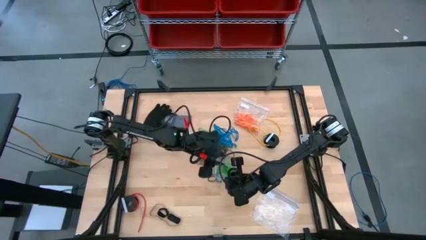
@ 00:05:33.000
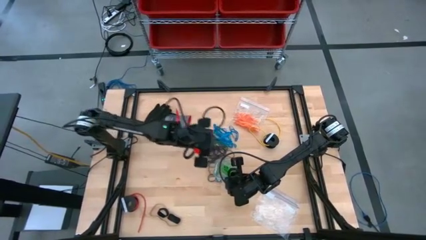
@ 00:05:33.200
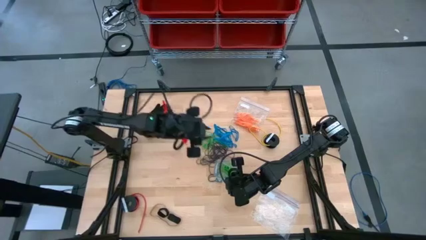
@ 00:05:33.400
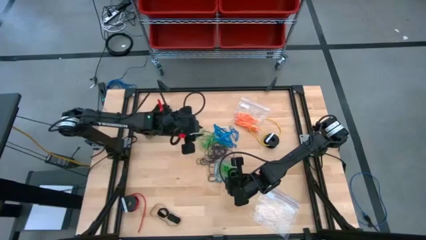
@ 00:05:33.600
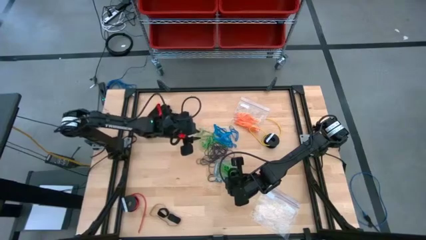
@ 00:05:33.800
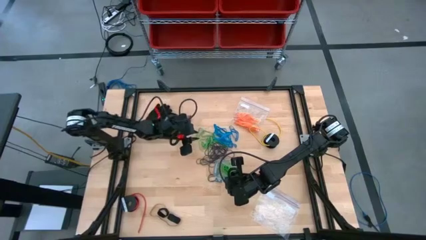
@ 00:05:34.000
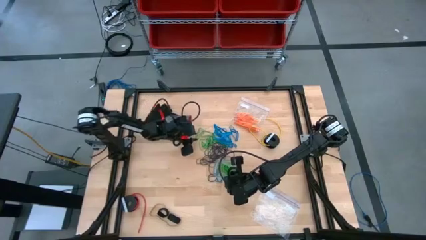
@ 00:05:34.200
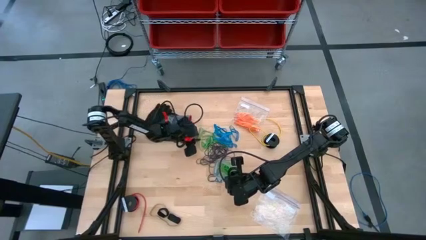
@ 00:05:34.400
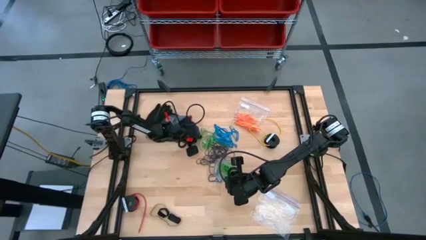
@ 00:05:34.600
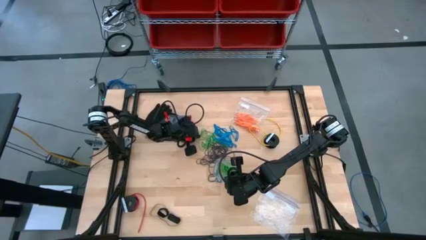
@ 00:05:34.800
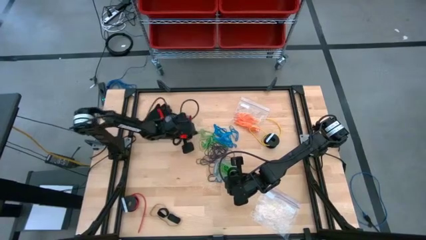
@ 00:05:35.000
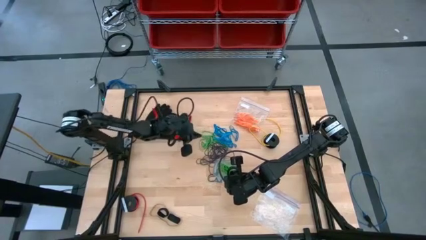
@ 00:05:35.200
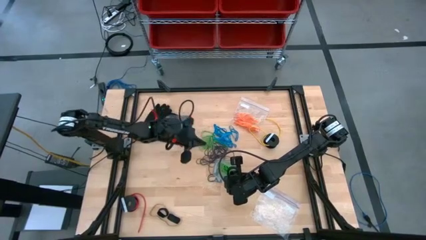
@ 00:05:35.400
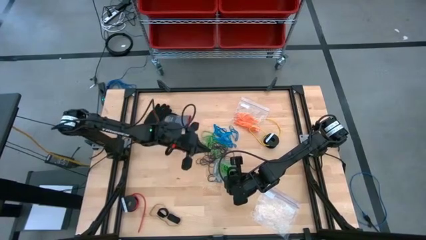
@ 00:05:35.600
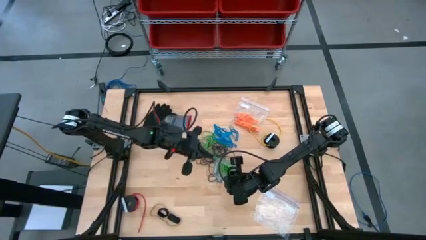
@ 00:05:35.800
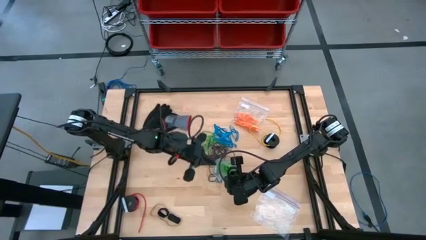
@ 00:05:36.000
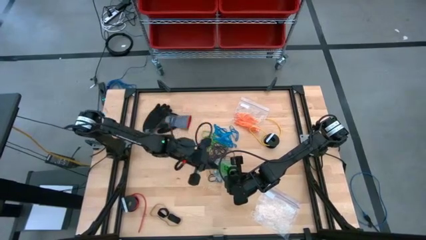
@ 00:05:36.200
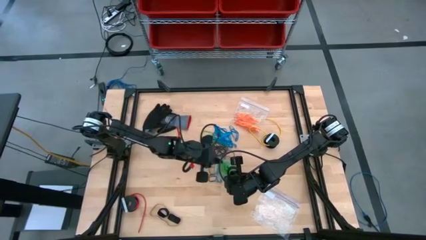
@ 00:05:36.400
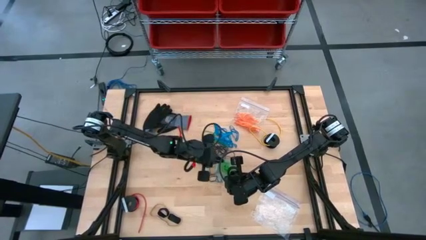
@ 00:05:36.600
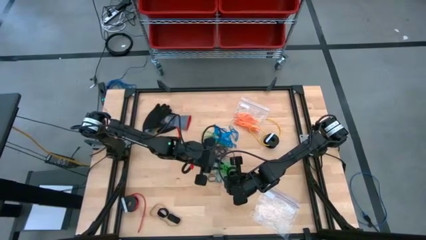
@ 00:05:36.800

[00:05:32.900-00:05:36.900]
Task: Sort rubber bands
Put the green rubber band into the transparent zip bag

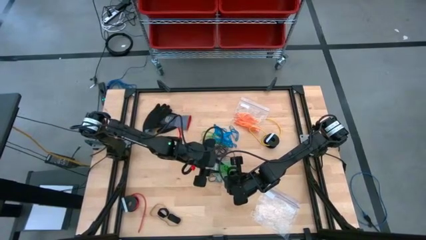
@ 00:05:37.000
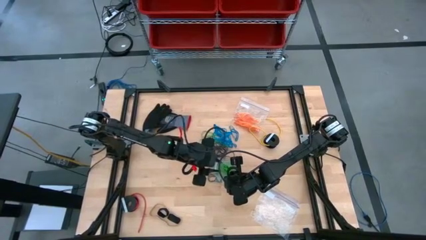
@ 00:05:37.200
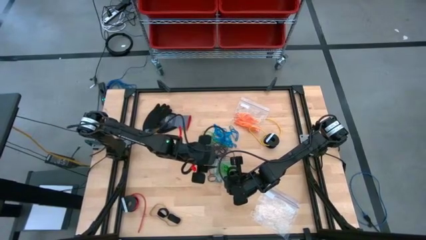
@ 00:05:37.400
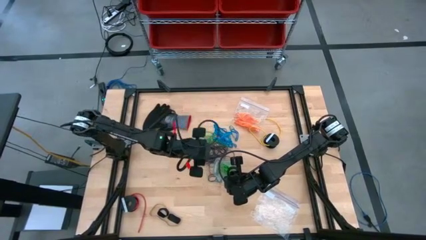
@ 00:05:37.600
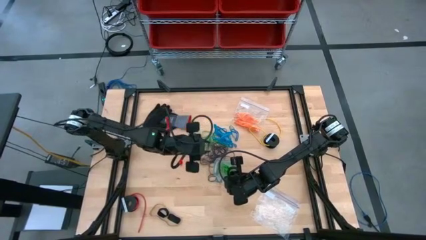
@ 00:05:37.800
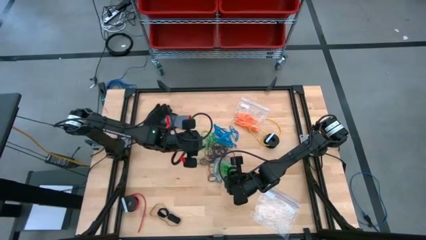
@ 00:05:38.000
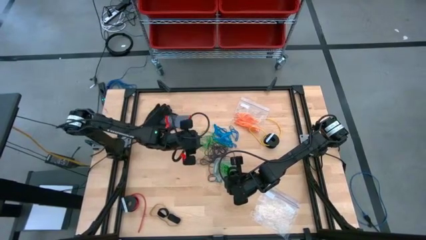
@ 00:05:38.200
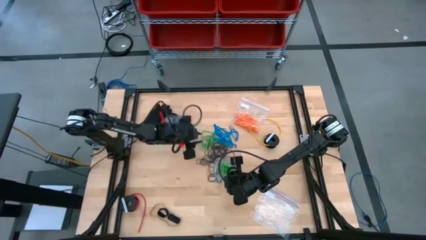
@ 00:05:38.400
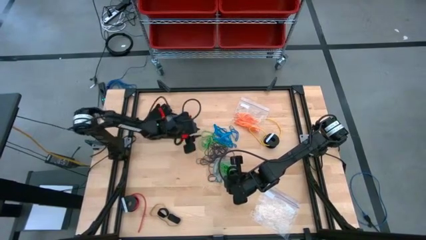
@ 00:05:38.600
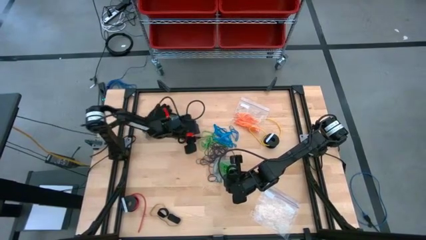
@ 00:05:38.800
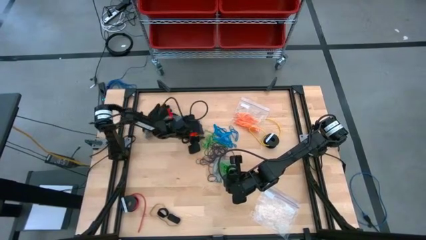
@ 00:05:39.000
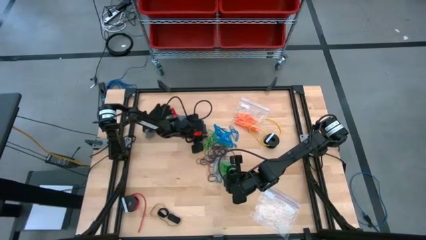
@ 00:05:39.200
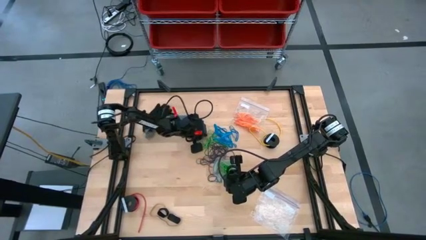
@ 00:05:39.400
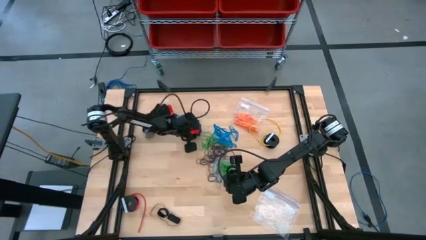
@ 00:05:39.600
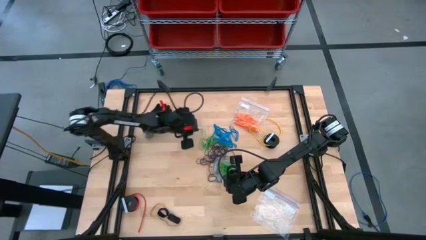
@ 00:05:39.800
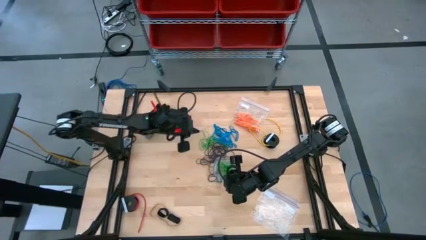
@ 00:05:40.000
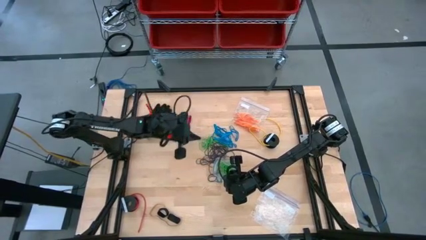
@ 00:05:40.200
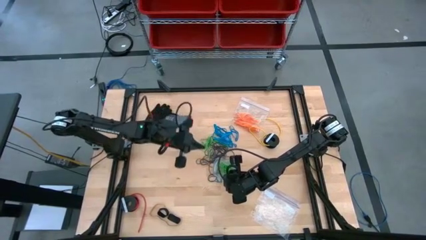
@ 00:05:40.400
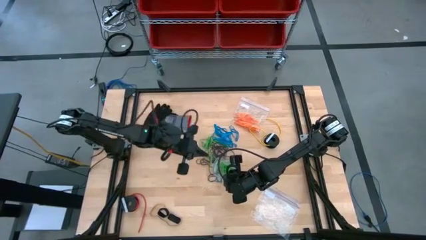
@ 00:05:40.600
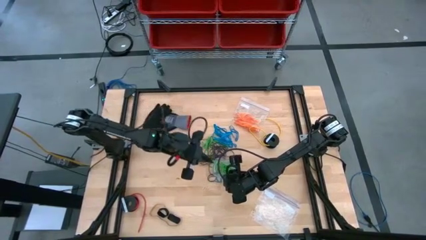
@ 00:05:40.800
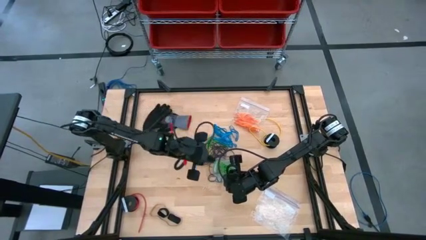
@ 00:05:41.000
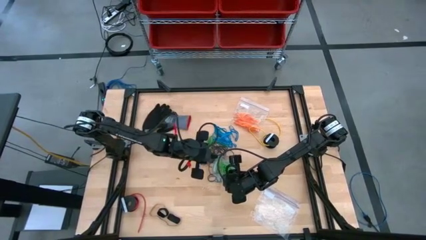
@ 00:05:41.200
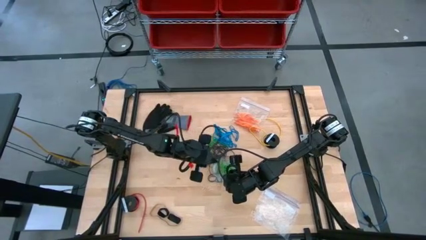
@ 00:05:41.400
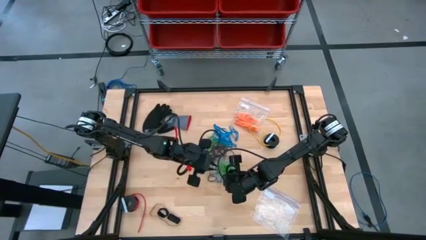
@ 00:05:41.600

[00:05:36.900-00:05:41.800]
Put the green rubber band into the transparent zip bag

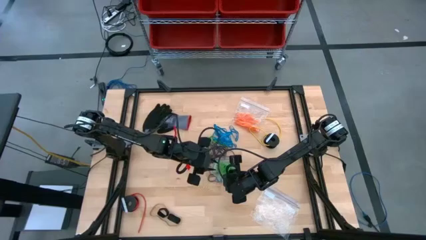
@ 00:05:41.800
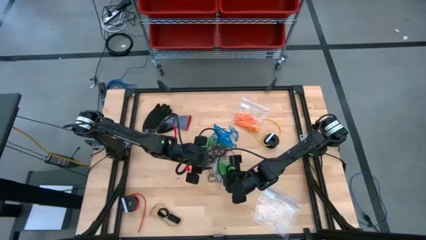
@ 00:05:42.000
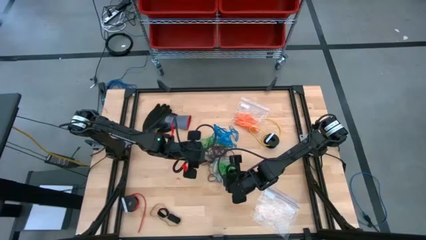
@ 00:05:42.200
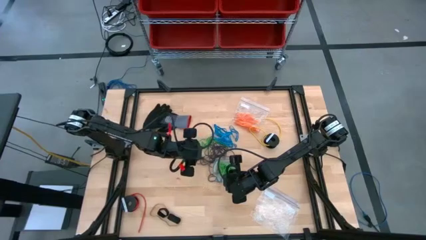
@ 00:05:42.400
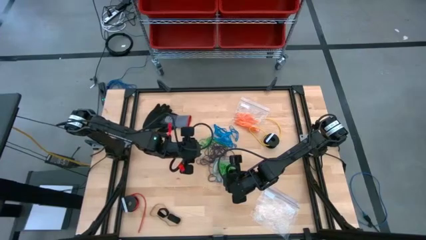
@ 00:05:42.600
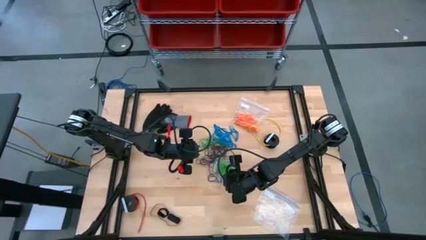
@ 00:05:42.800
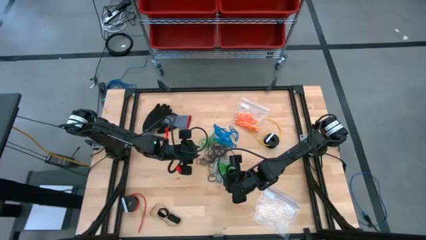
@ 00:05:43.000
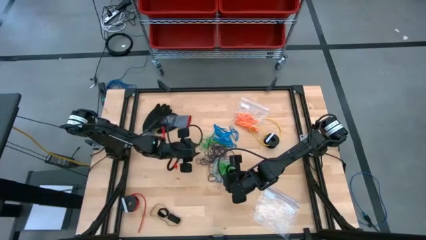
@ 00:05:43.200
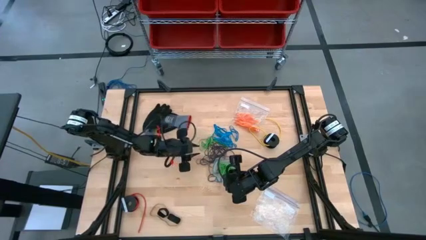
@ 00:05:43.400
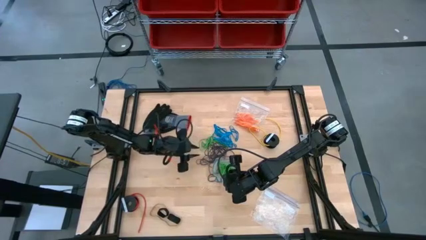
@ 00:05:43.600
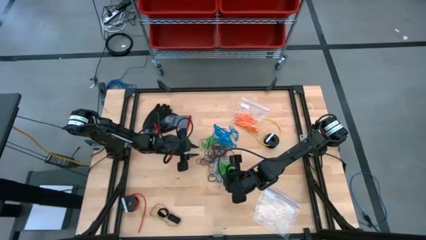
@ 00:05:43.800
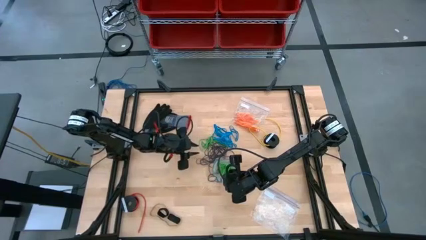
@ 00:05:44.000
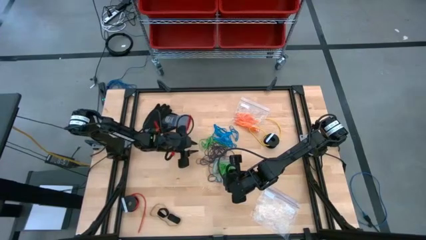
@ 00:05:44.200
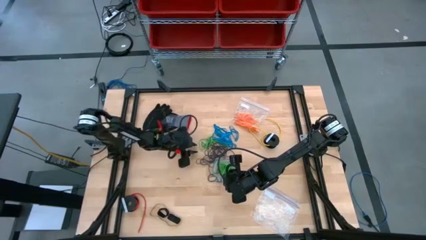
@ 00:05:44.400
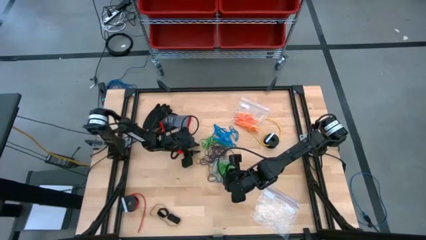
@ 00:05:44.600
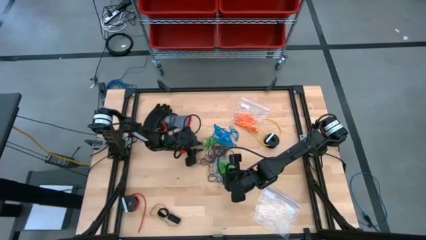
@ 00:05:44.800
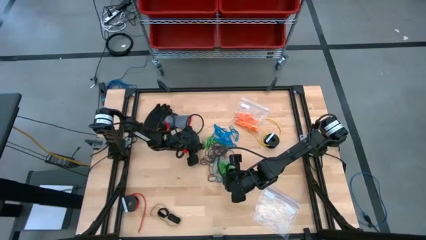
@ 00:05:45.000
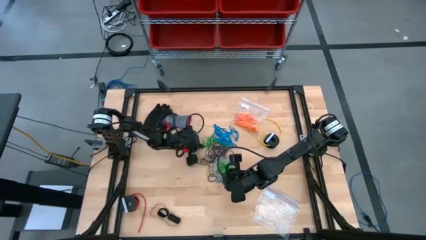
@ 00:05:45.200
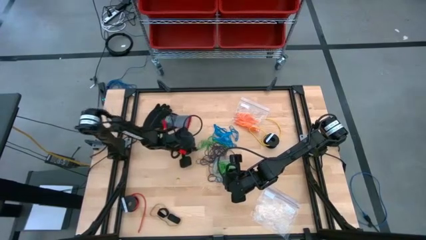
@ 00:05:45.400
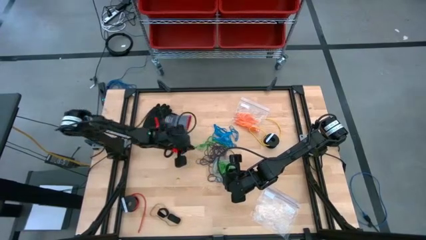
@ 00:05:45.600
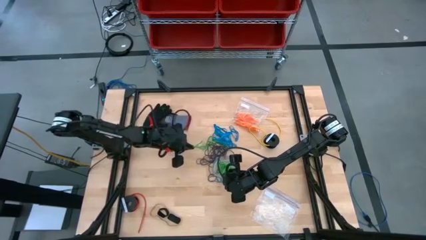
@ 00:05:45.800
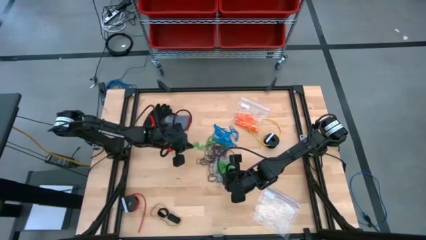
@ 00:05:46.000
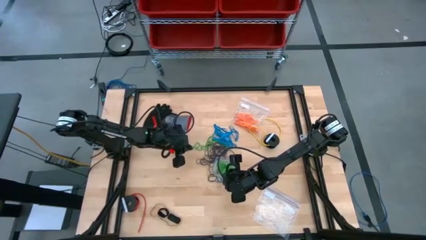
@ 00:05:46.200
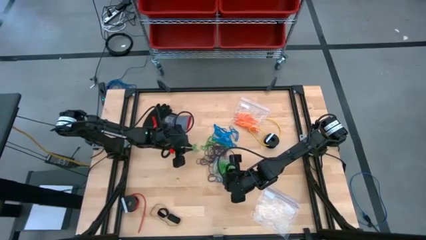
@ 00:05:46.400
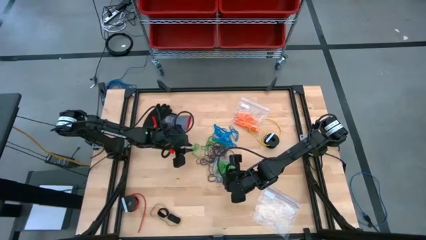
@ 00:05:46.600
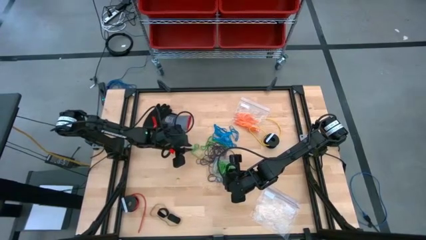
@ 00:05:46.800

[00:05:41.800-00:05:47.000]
Put the green rubber band into the transparent zip bag

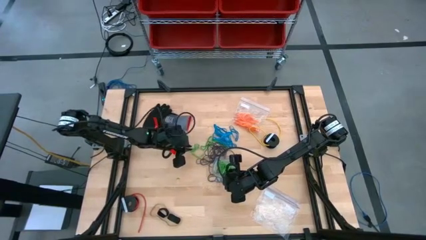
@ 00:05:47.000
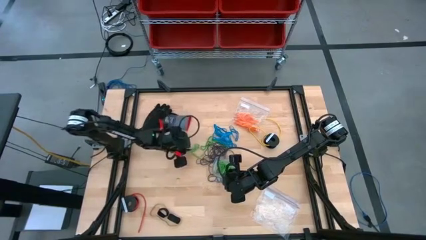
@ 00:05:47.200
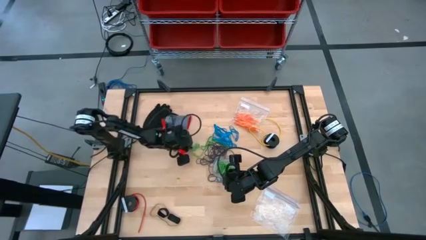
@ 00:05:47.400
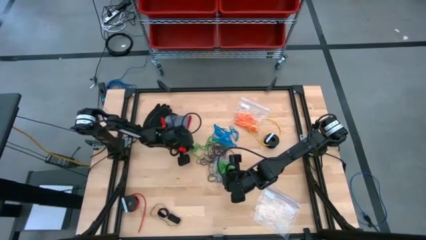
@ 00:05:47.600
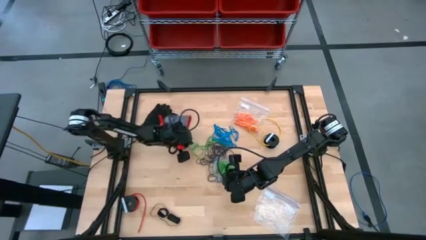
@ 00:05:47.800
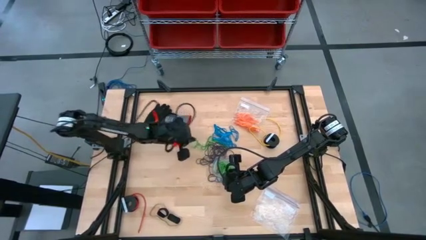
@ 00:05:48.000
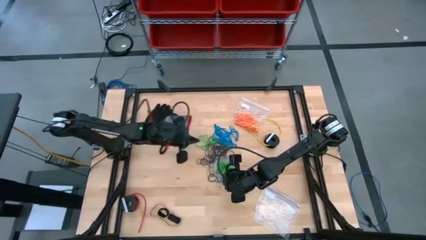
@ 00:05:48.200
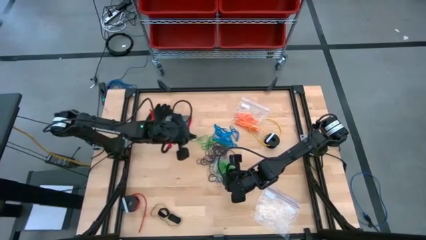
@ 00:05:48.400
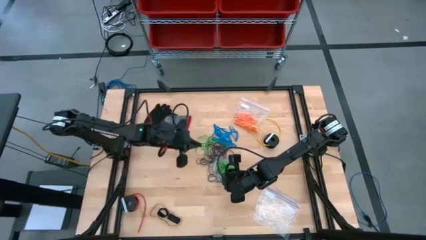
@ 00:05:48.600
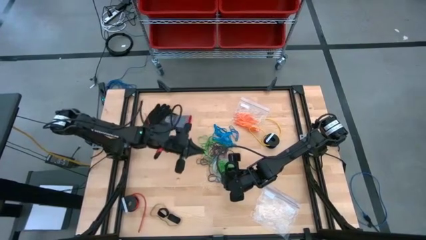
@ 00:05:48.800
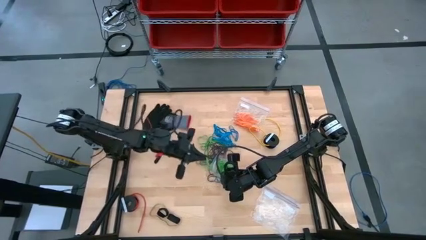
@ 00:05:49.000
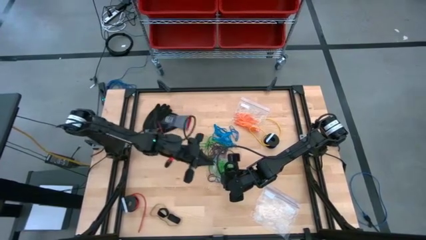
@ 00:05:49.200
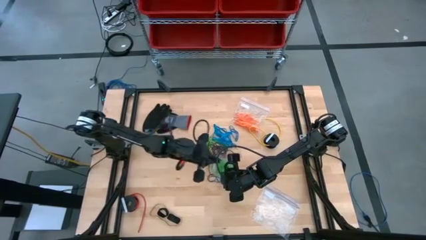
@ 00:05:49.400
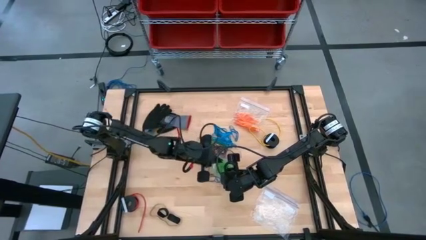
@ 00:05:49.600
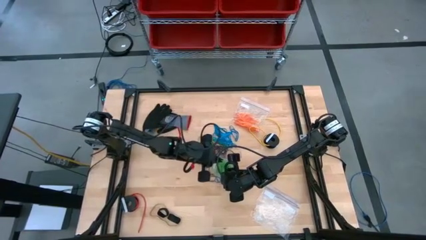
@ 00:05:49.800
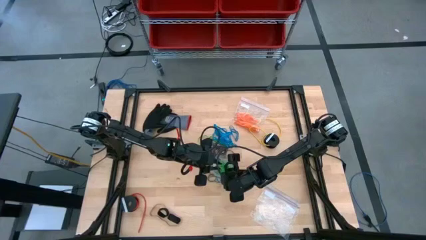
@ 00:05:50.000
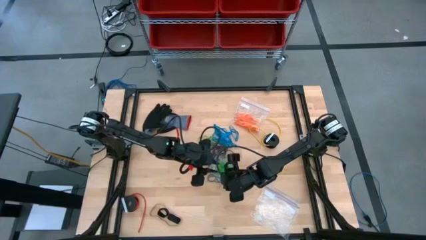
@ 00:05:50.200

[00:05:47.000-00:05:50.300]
Put the green rubber band into the transparent zip bag
